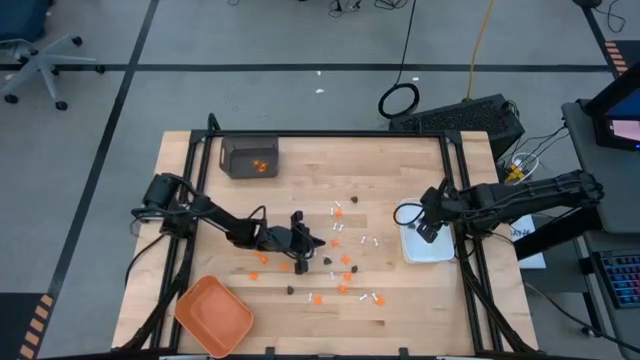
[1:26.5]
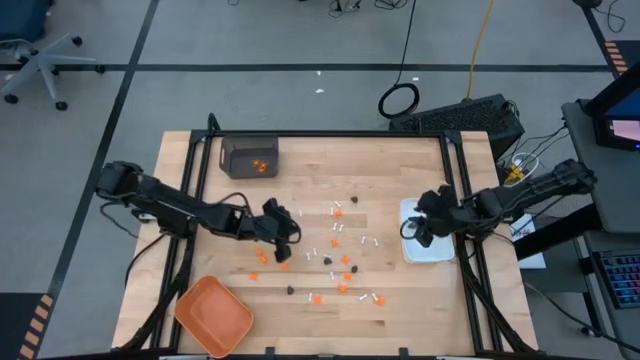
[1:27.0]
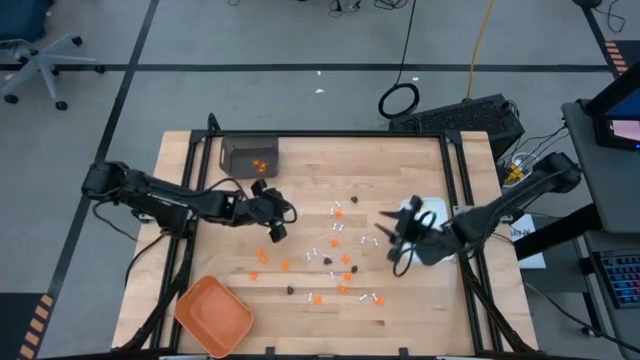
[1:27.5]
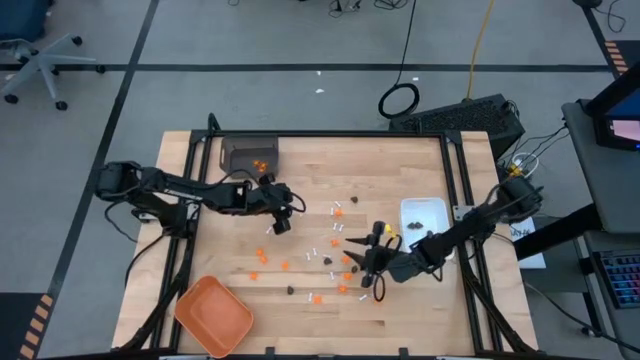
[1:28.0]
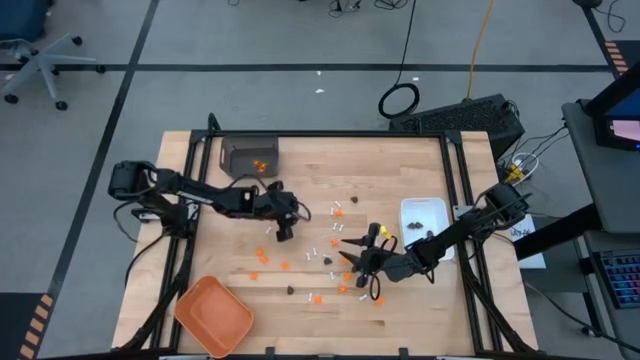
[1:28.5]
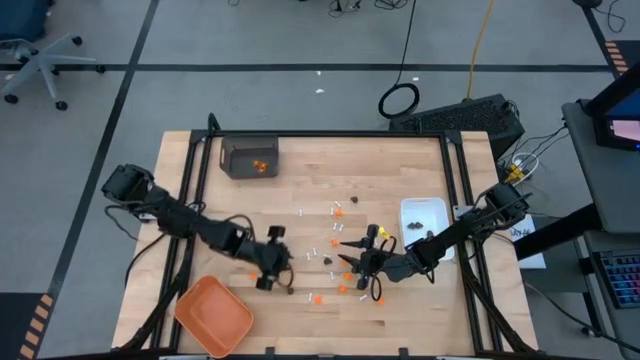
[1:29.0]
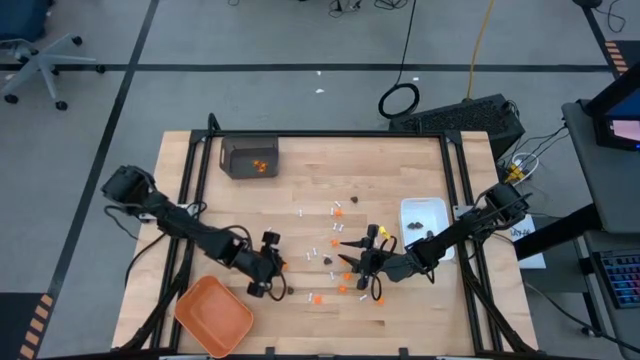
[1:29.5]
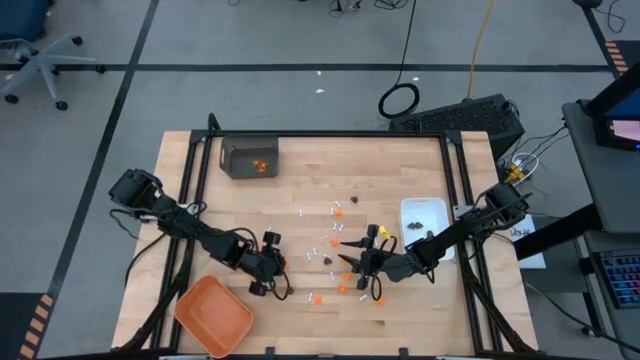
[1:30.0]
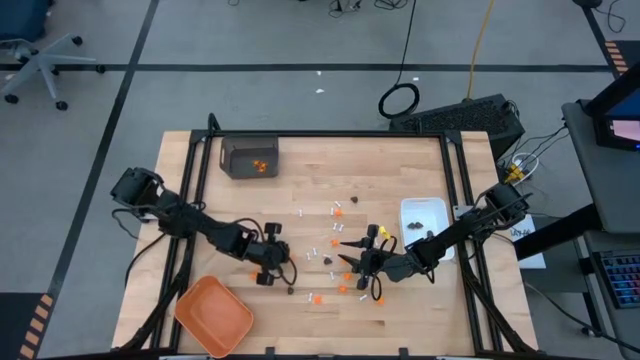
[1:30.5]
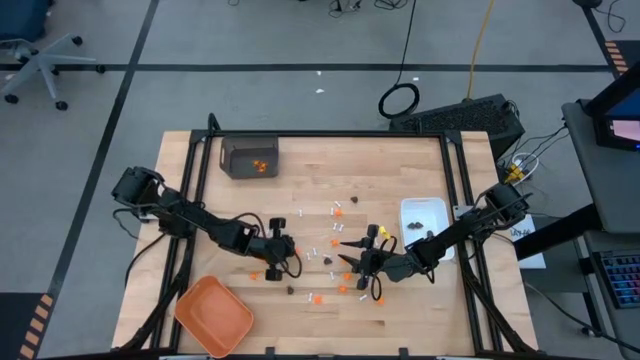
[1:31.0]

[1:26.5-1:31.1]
Task: Sort Halloween decoration
Put the orange spider toy into the black bin

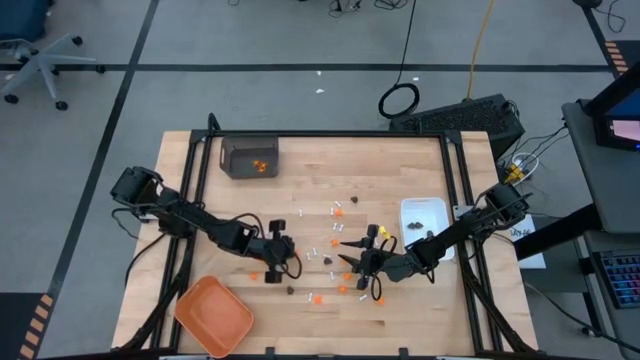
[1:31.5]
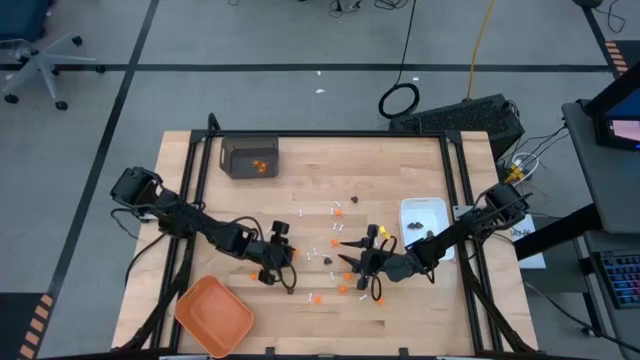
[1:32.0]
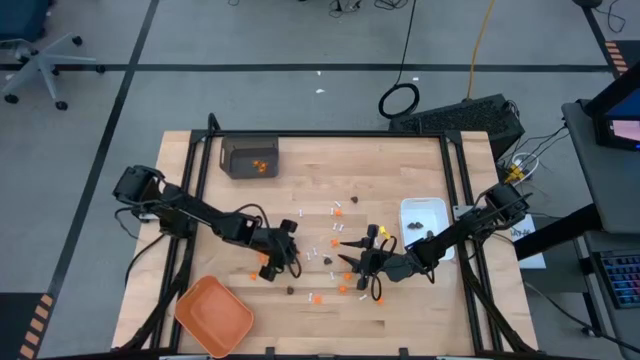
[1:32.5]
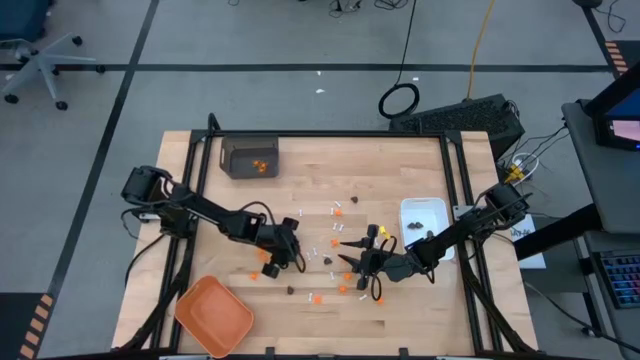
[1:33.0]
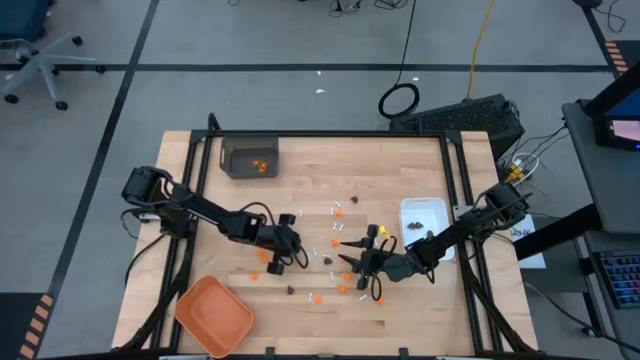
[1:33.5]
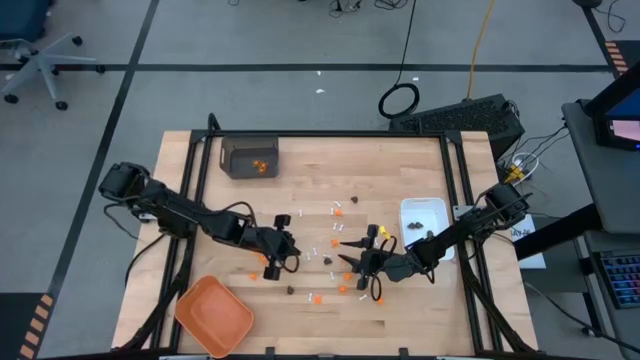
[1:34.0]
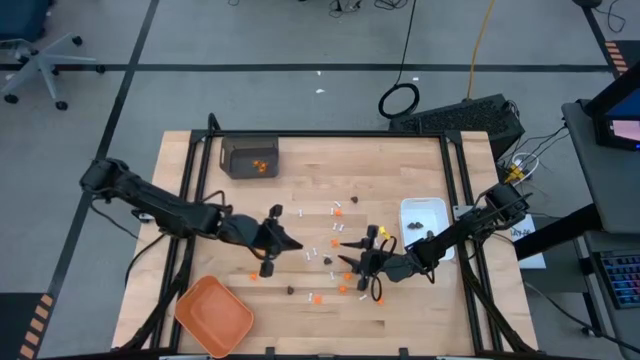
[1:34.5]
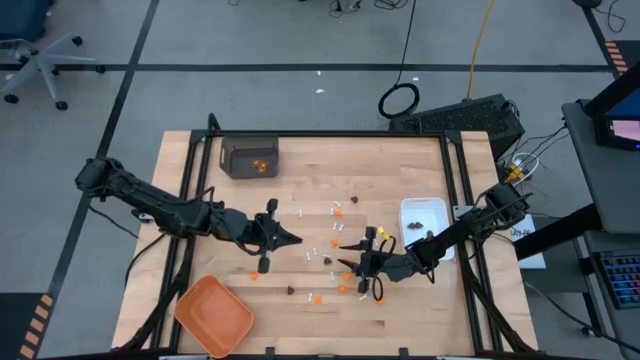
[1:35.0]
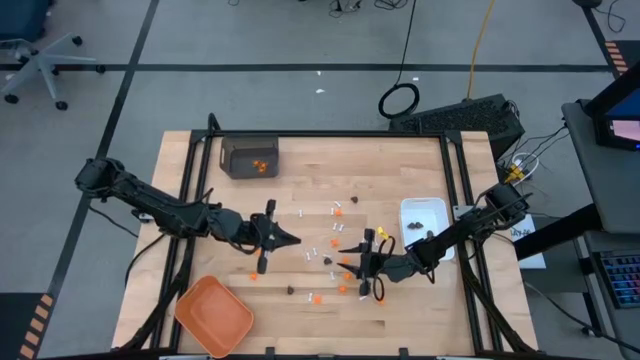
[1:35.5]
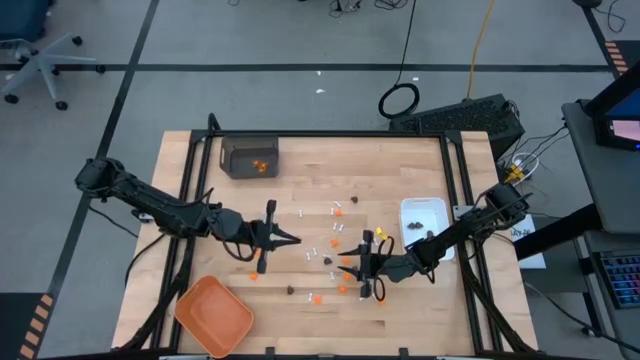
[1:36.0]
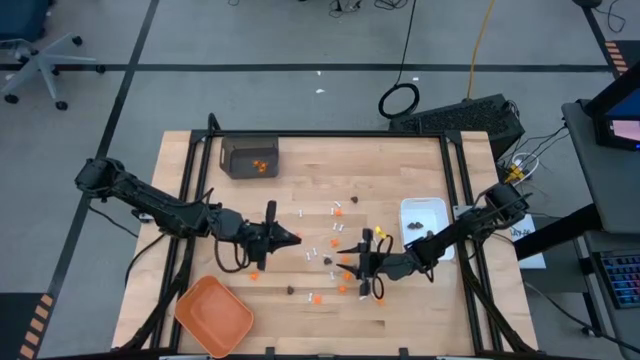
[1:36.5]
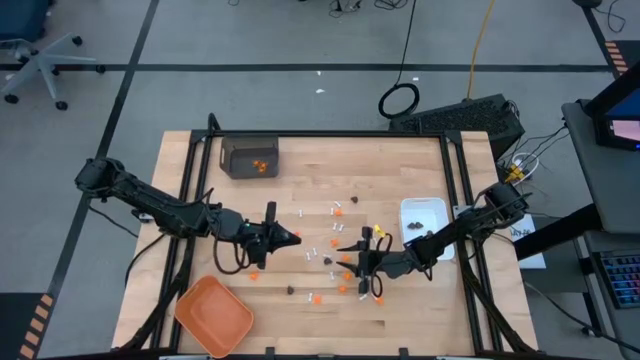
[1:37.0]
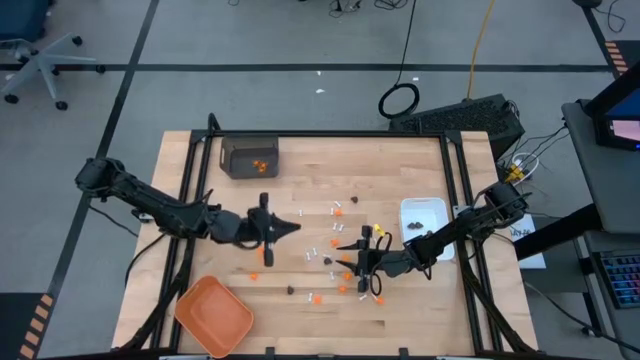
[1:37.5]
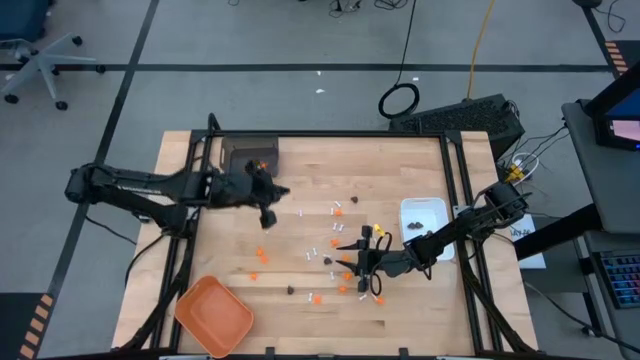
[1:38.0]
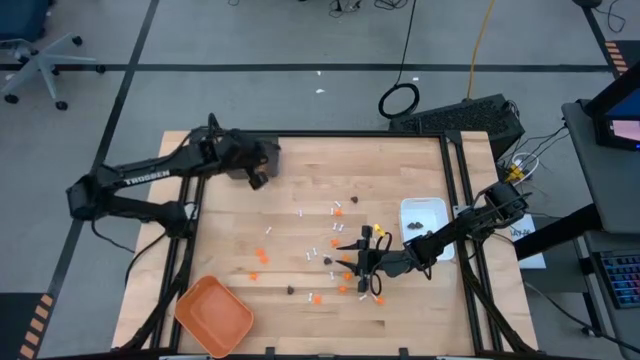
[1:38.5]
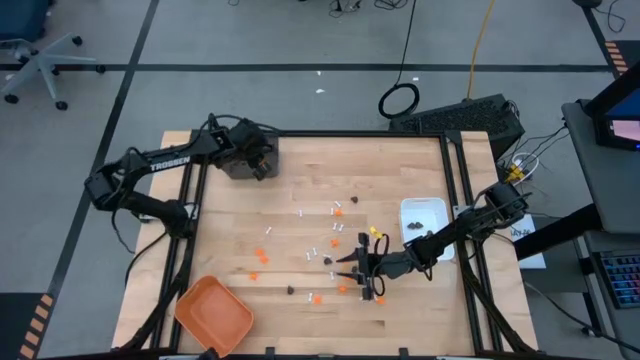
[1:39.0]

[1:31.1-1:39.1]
Put the orange spider toy into the black bin

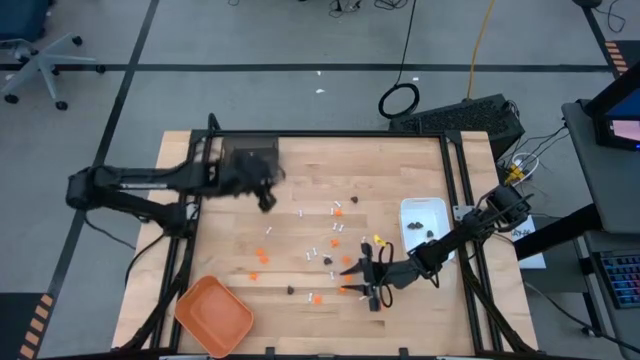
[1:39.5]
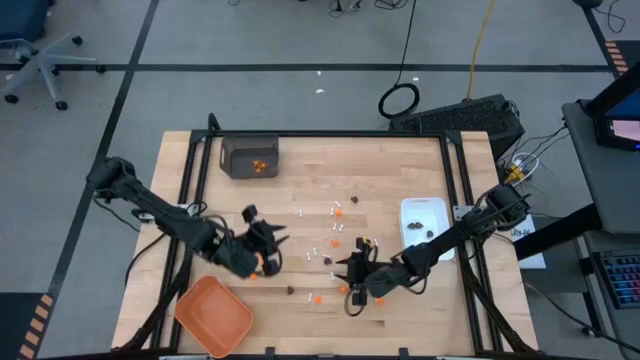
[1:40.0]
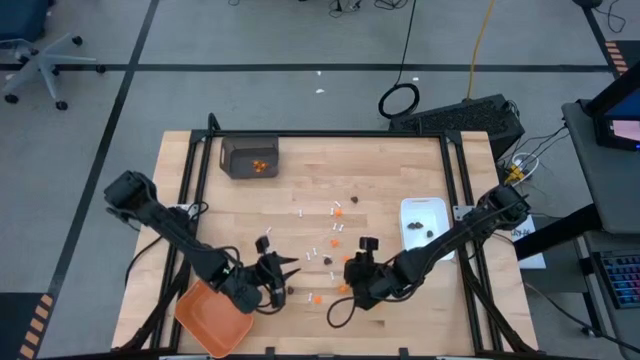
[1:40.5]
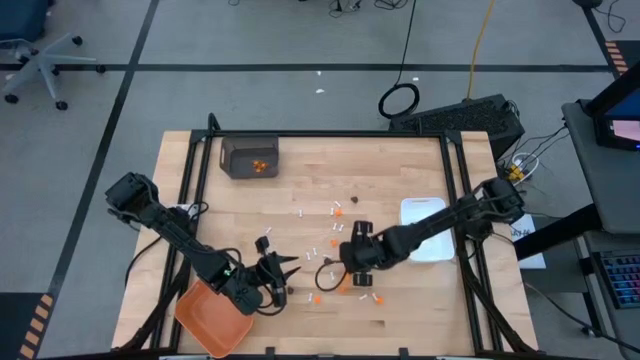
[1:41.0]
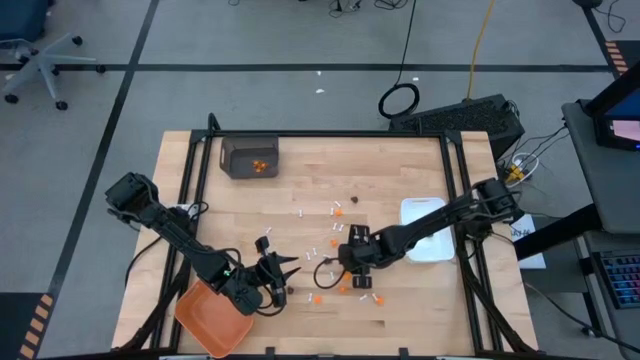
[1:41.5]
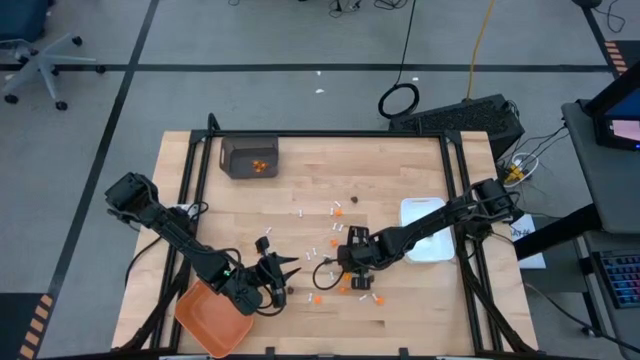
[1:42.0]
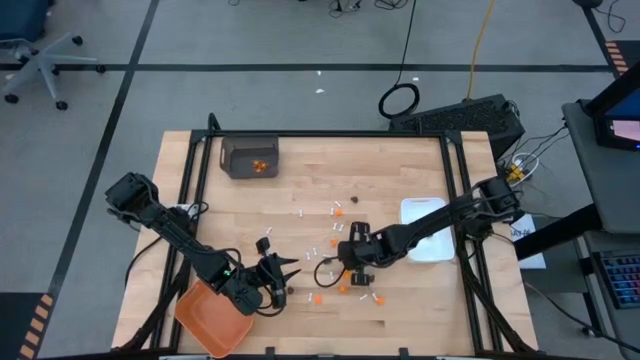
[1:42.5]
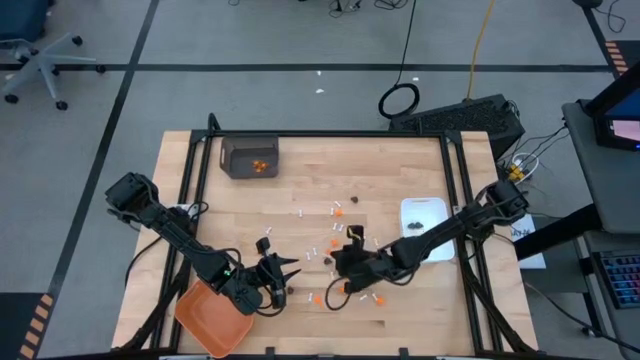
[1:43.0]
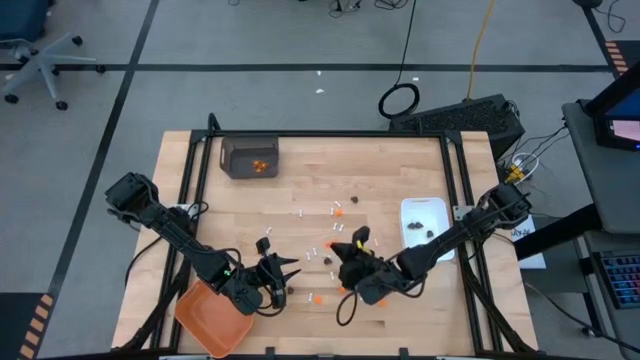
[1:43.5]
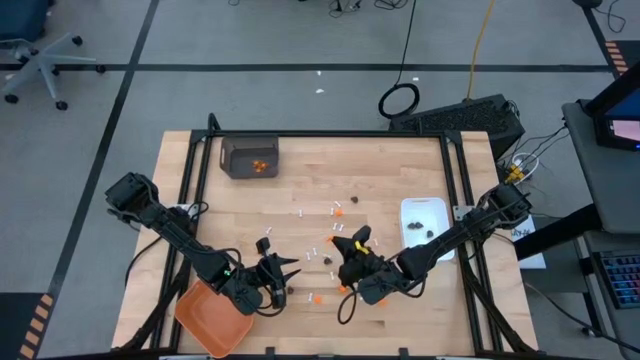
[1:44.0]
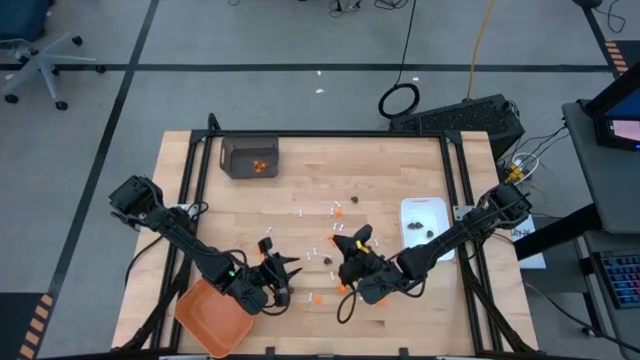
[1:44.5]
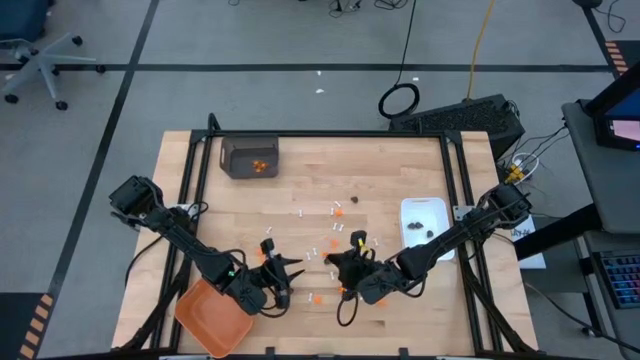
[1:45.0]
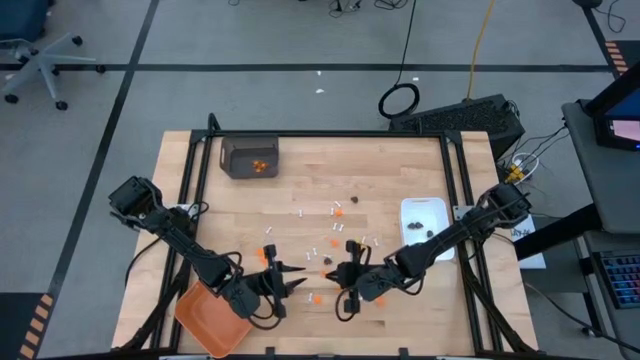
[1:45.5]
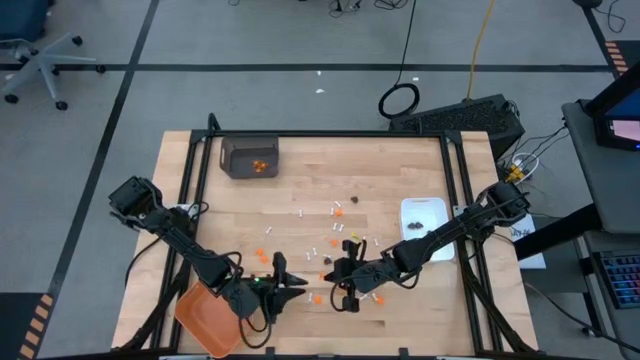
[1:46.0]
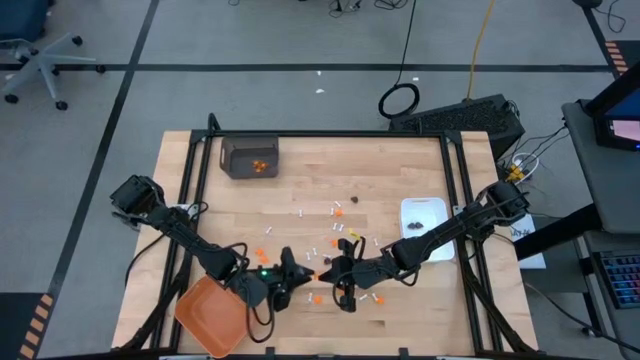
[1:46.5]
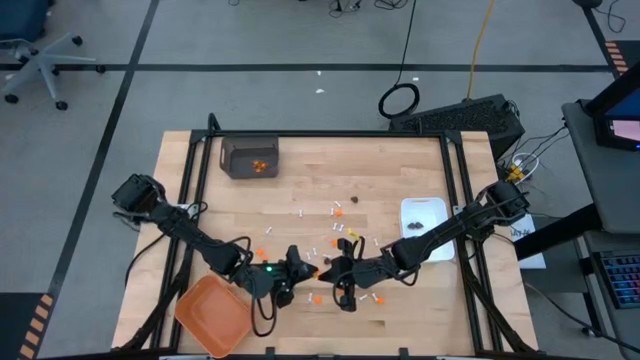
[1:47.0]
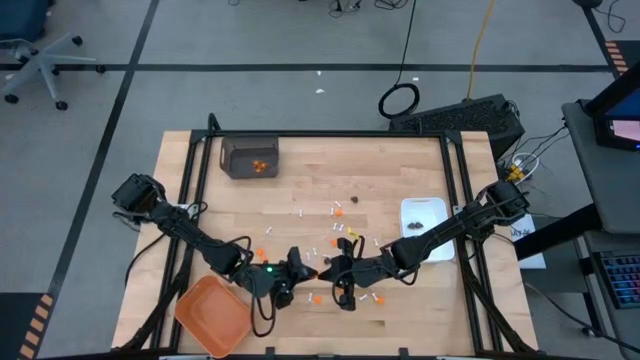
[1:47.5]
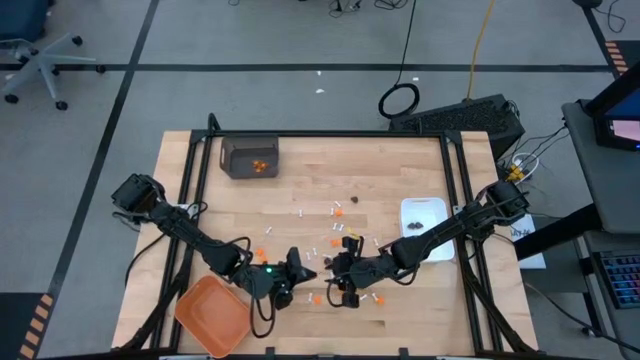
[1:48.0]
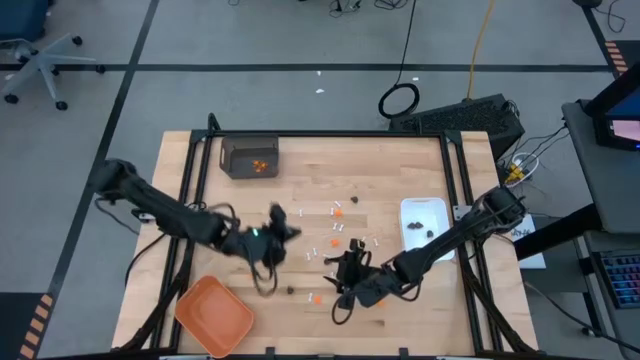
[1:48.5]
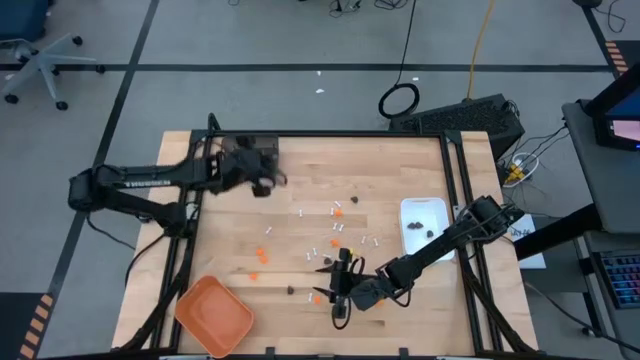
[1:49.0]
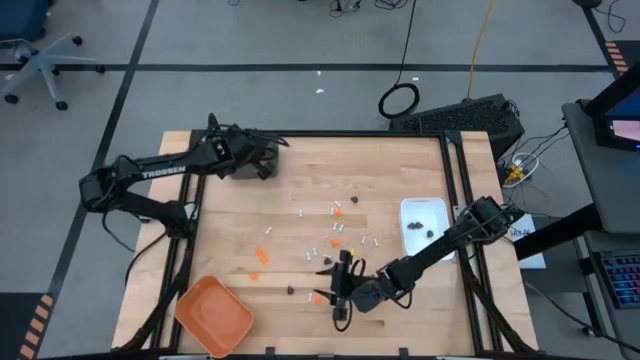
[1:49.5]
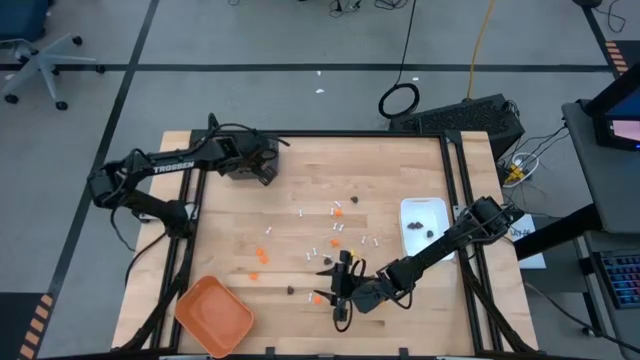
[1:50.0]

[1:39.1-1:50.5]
Put the orange spider toy into the black bin
